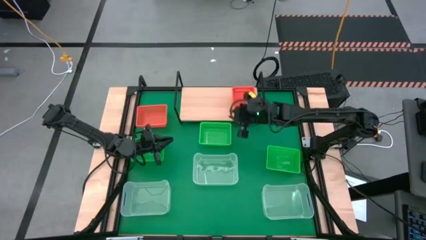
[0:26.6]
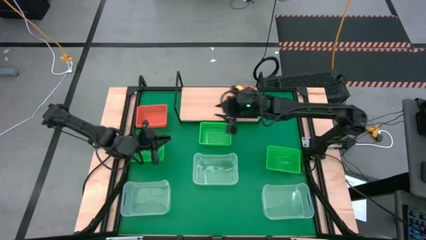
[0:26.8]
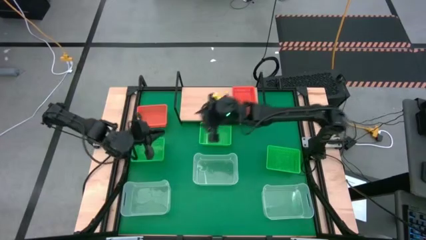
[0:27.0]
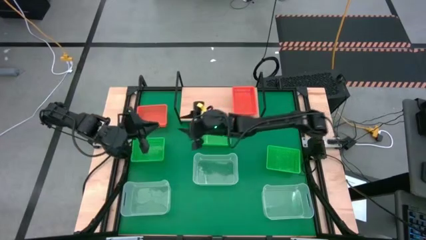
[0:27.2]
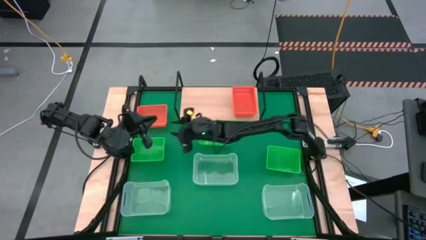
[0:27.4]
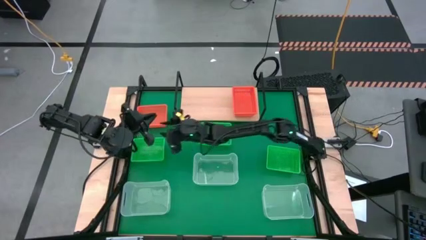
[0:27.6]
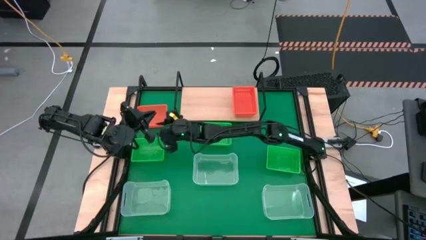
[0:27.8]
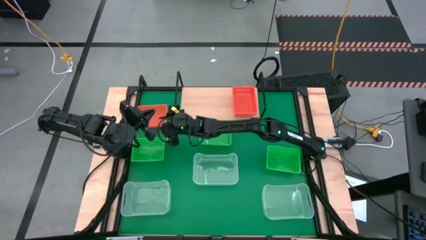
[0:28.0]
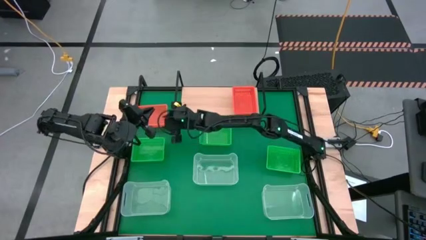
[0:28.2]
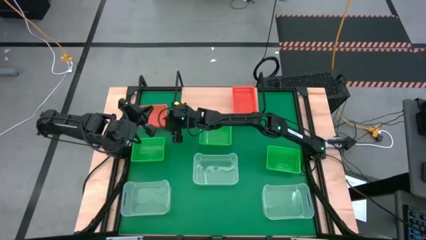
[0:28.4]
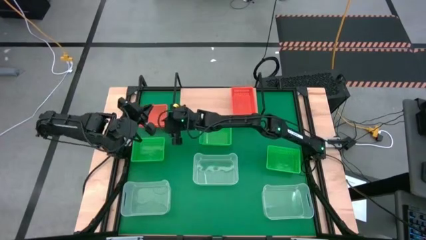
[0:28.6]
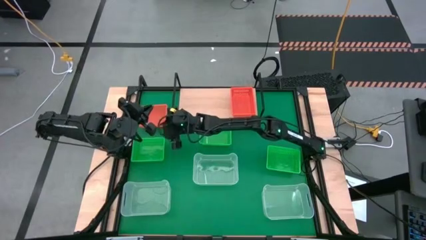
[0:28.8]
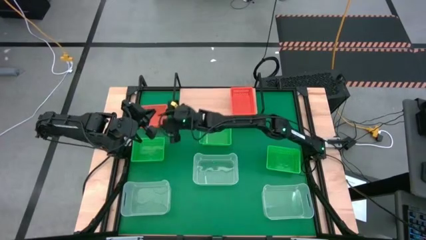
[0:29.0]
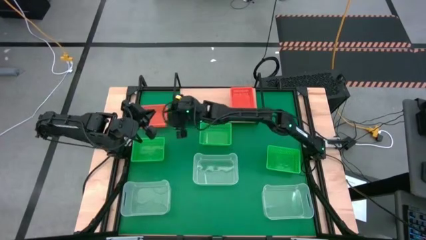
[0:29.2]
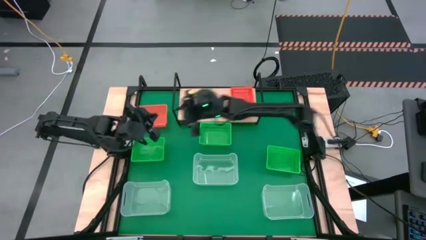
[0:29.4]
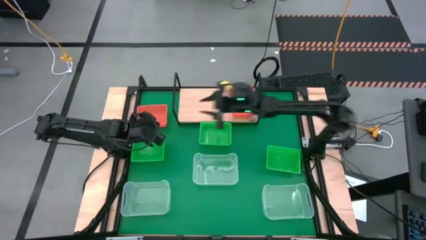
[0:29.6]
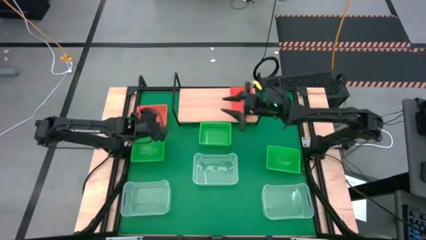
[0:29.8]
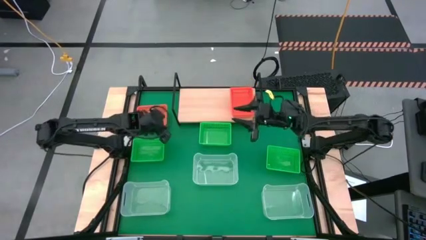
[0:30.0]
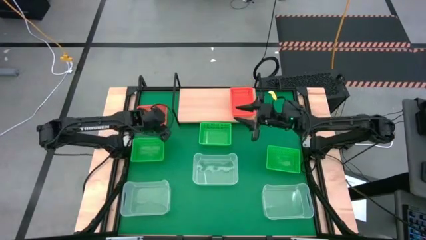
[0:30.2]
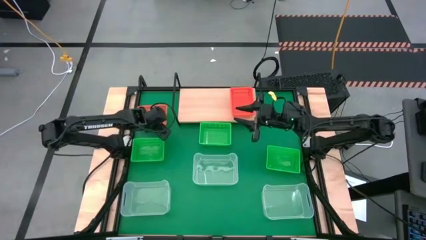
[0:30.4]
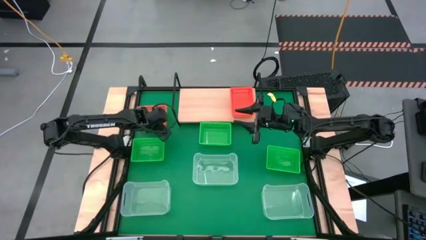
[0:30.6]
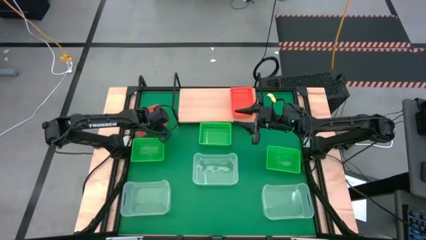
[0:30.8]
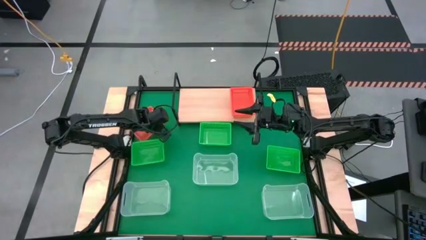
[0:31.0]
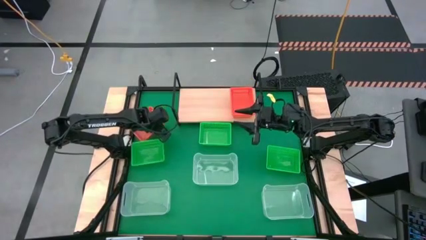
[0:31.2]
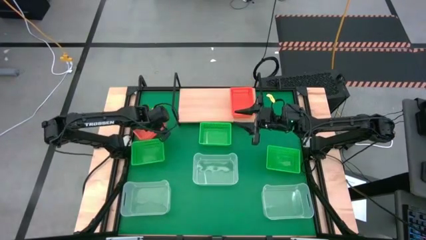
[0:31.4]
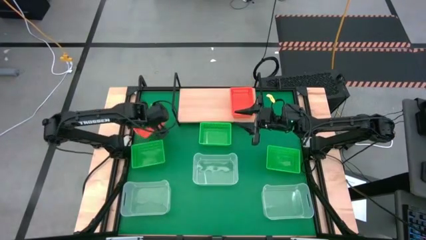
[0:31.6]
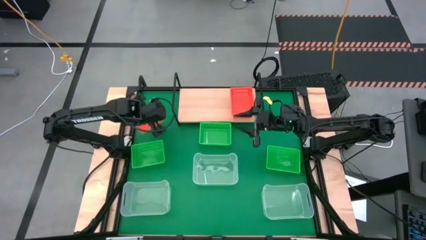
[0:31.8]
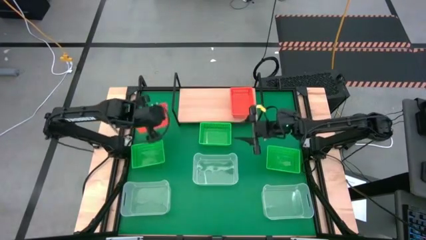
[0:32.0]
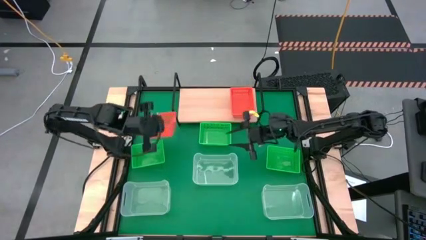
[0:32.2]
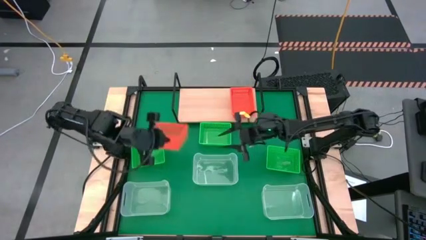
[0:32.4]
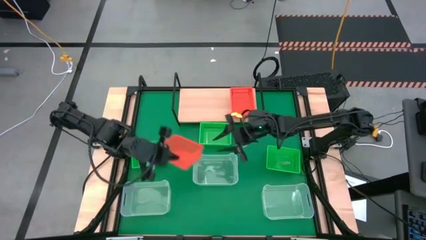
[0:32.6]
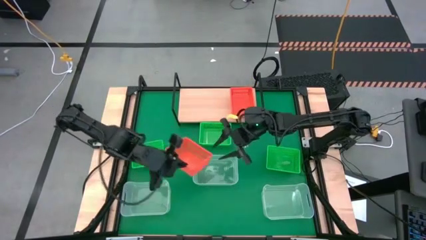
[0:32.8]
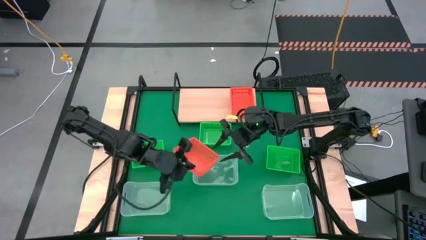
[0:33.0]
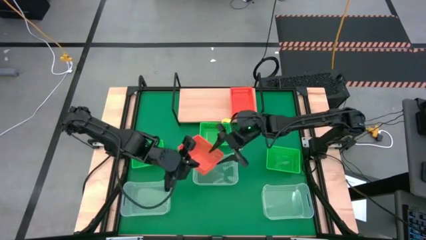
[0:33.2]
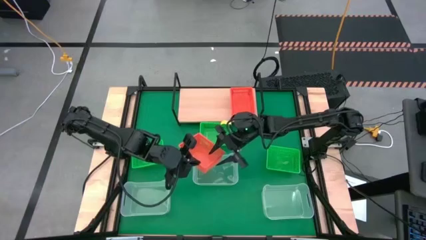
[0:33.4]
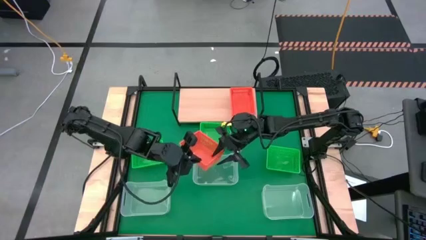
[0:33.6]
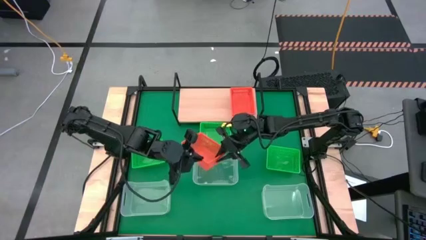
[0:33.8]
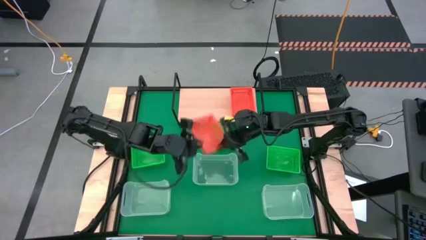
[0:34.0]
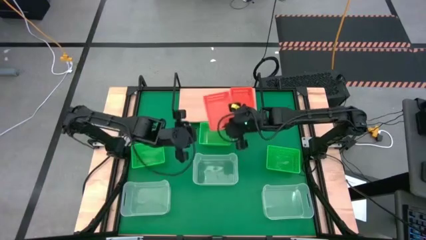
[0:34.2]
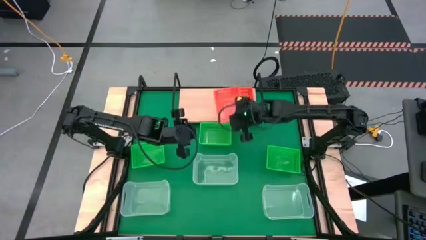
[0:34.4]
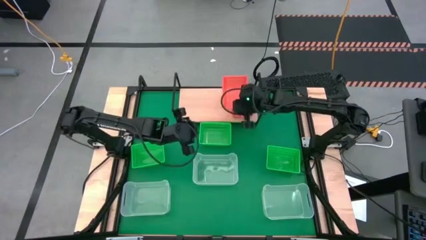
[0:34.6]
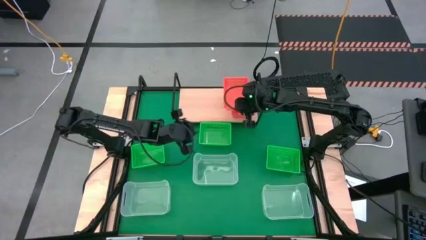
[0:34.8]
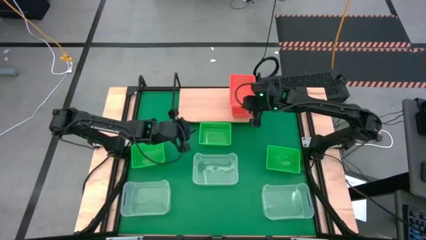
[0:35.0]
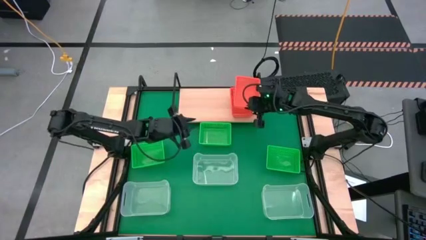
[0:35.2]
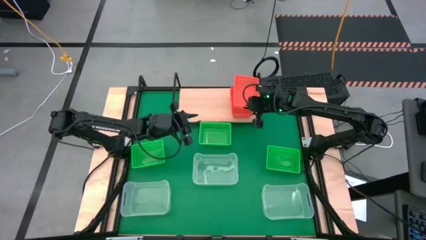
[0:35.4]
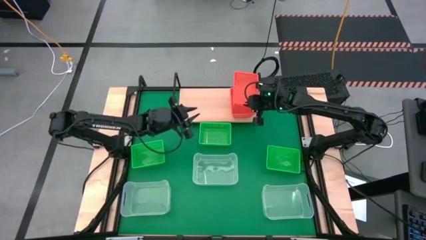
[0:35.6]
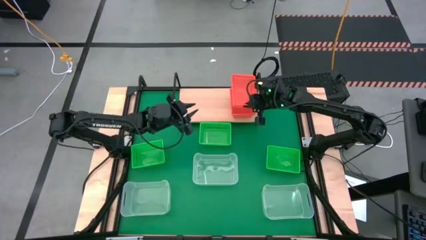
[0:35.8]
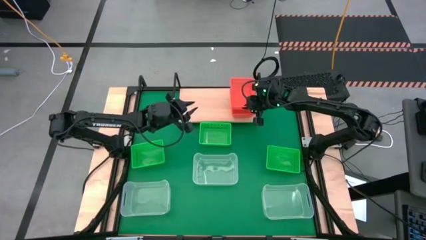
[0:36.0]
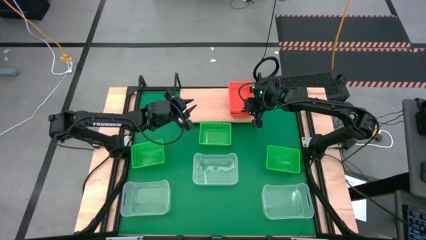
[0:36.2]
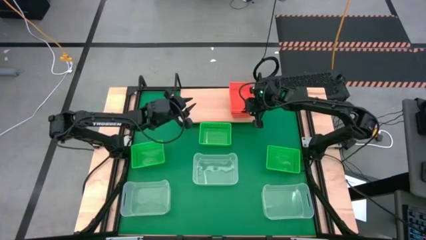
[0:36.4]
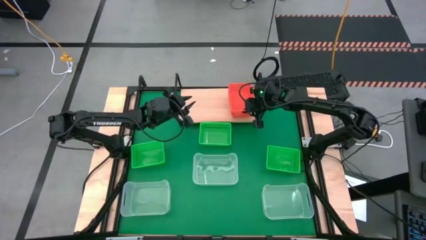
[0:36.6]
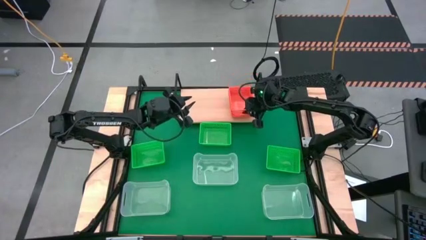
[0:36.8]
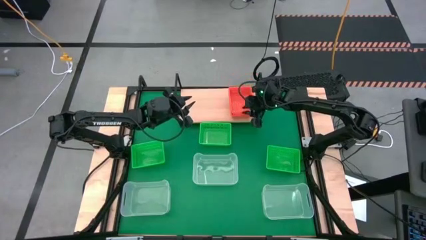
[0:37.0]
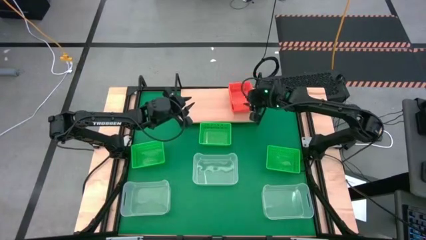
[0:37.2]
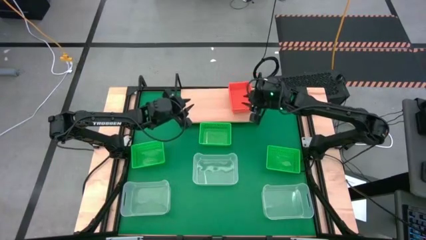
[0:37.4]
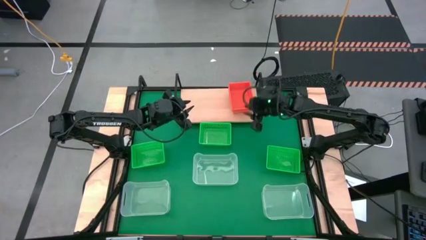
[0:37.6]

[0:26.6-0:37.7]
Task: Stack baskets on shelf by color
Stack the orange bin on top of the stacked orange bins on the shelf

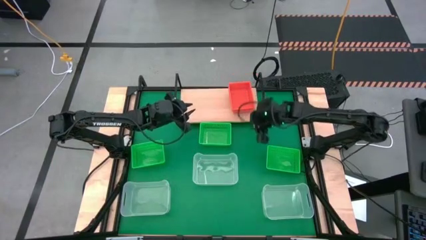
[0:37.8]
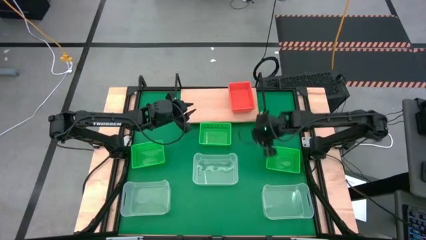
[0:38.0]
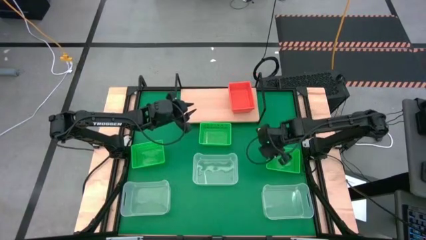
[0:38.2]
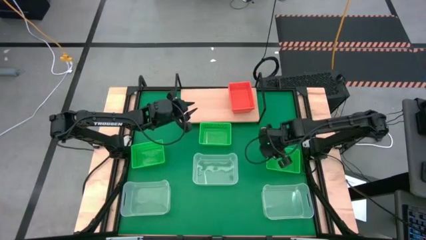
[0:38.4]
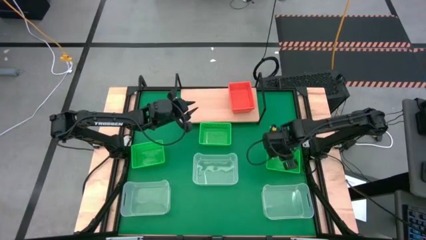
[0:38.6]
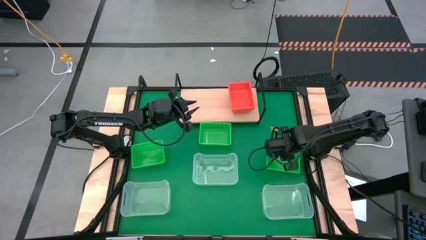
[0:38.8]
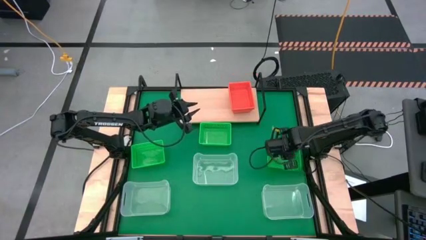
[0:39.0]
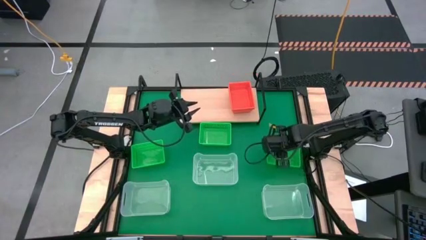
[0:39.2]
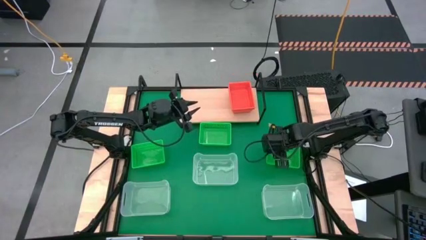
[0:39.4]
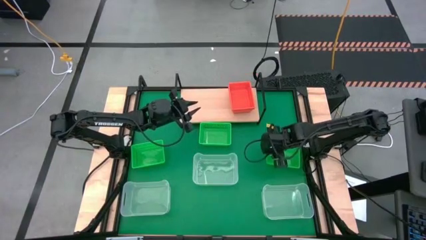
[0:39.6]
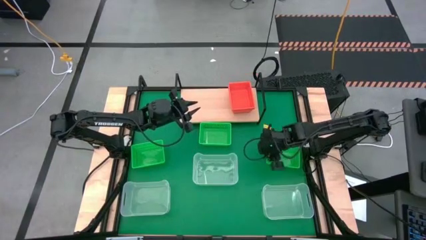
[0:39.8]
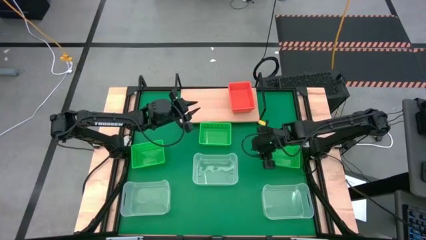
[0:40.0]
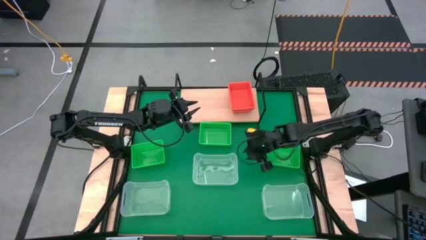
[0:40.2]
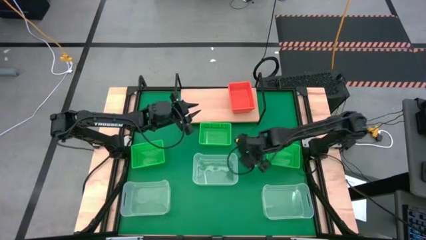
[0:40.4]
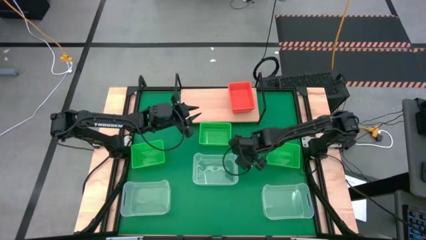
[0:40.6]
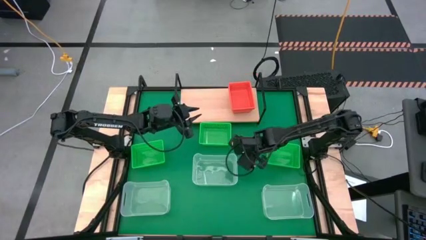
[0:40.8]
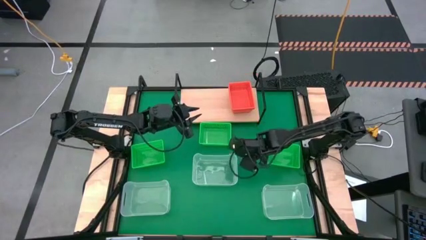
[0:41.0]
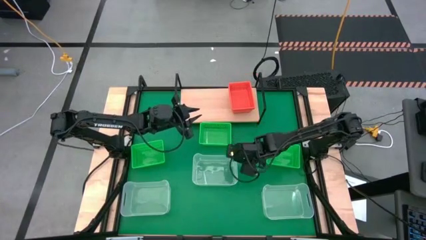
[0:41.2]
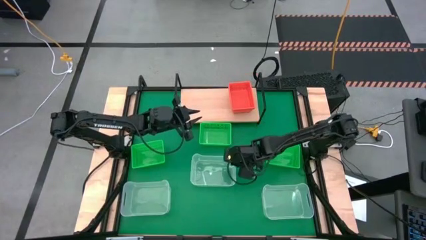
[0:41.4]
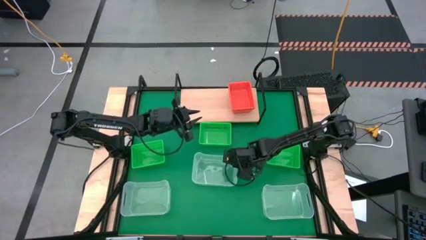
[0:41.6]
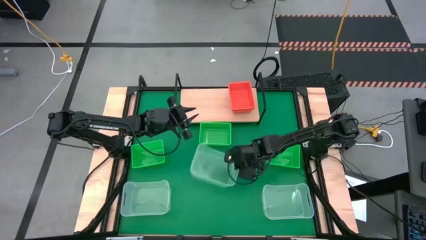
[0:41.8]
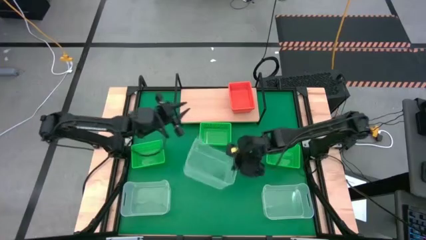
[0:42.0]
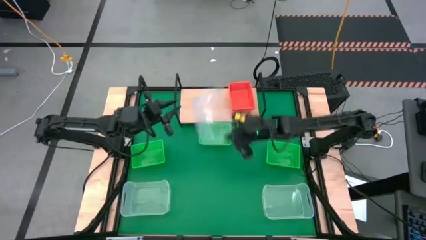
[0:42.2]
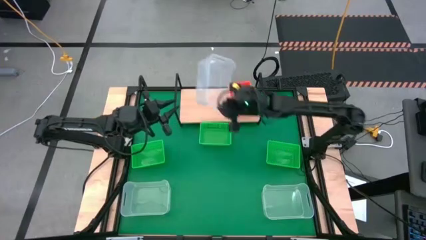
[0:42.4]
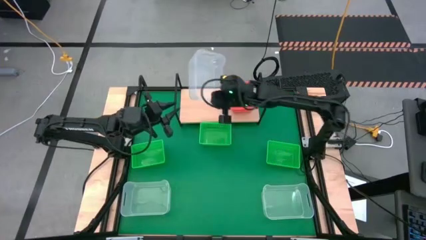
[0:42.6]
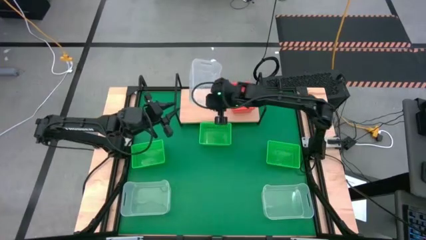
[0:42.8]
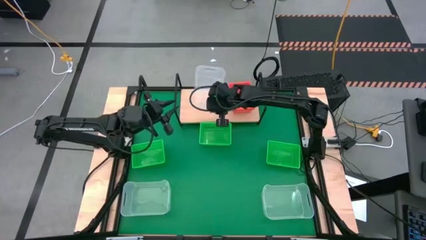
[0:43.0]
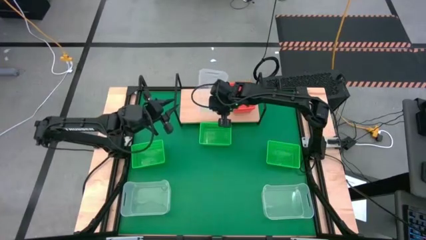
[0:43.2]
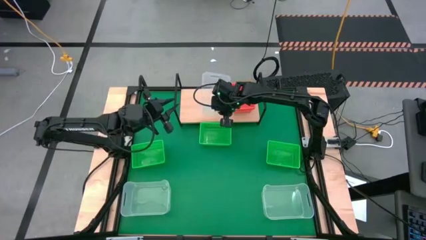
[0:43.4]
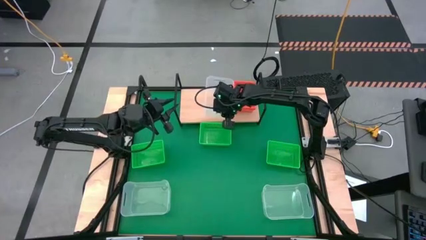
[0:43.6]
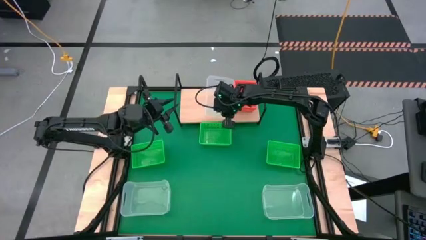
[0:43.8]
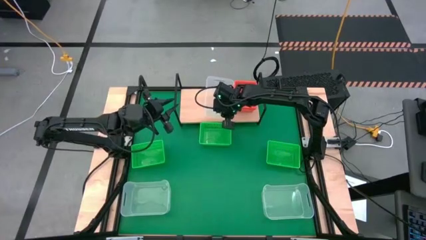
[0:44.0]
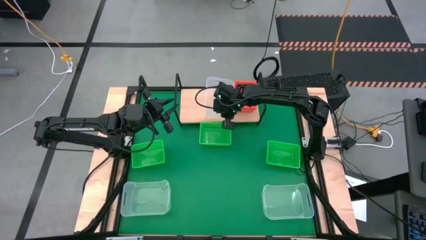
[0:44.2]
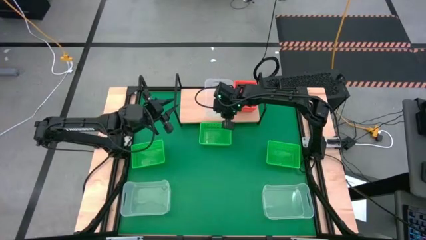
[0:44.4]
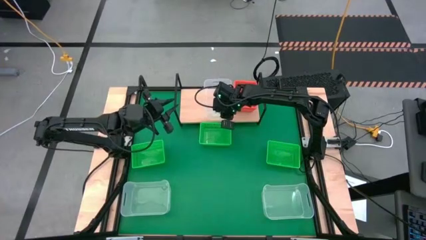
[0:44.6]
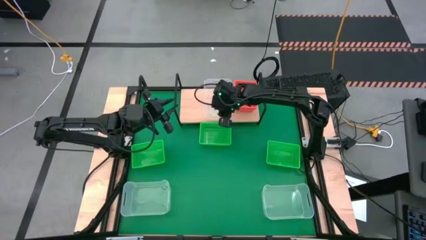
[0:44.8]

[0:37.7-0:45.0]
Put the center transparent bin on the shelf
